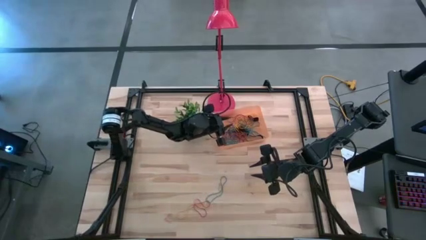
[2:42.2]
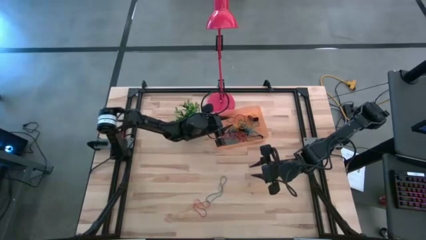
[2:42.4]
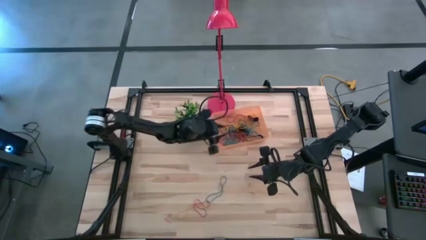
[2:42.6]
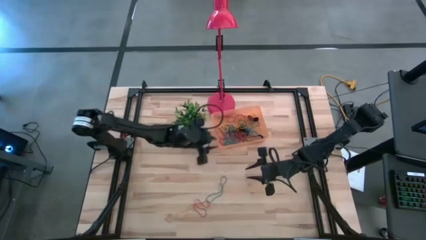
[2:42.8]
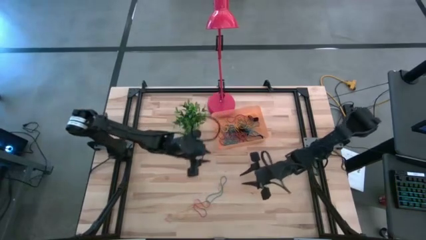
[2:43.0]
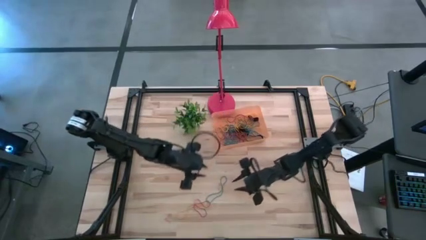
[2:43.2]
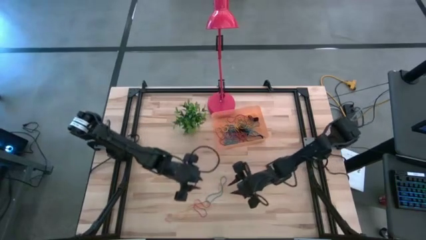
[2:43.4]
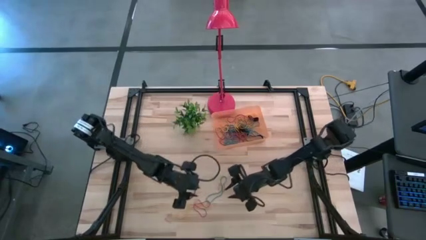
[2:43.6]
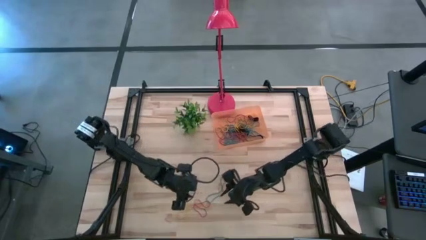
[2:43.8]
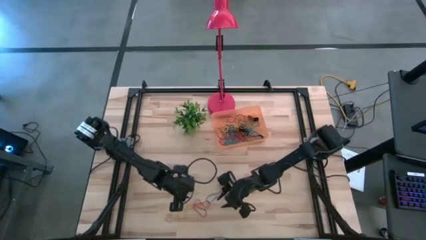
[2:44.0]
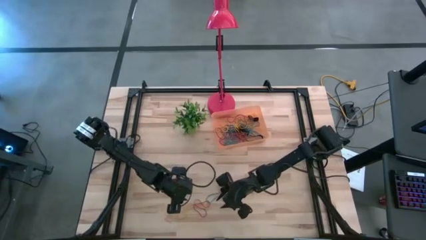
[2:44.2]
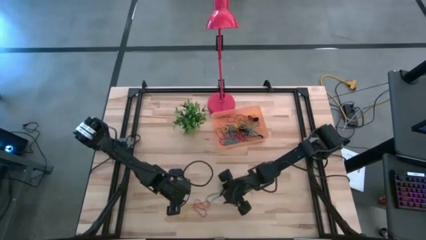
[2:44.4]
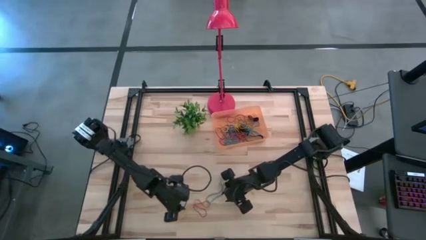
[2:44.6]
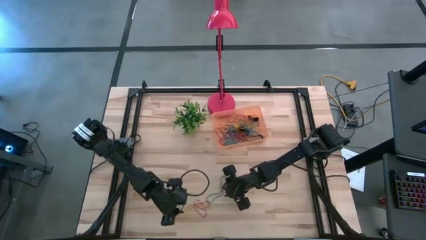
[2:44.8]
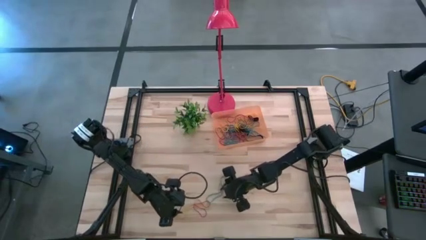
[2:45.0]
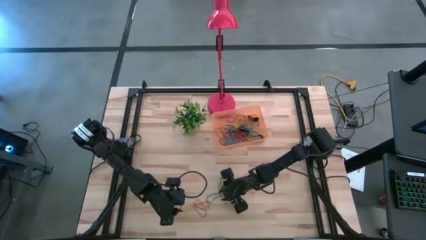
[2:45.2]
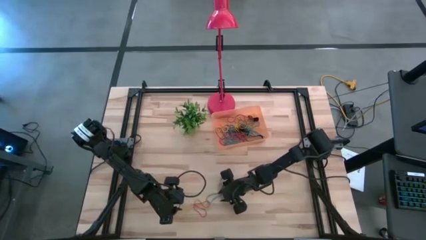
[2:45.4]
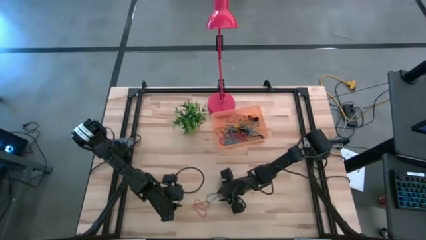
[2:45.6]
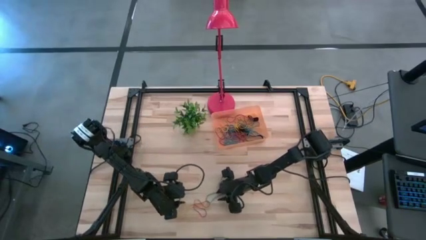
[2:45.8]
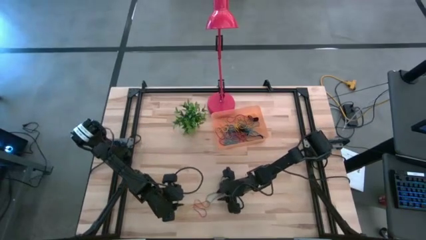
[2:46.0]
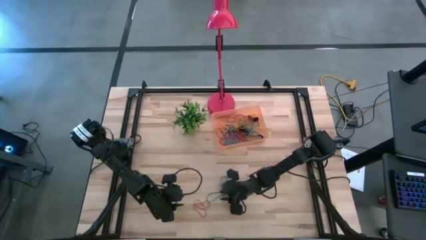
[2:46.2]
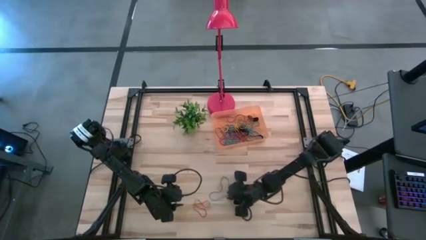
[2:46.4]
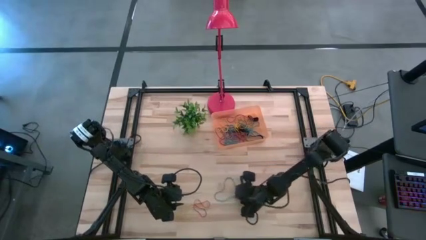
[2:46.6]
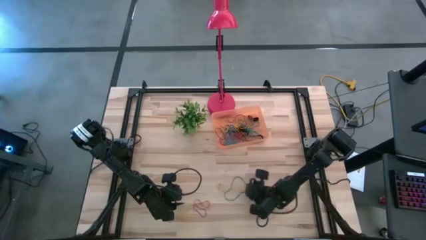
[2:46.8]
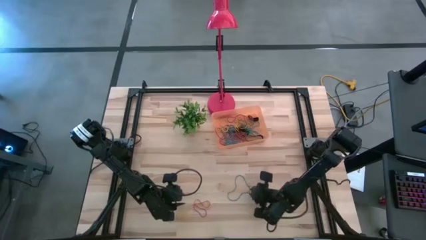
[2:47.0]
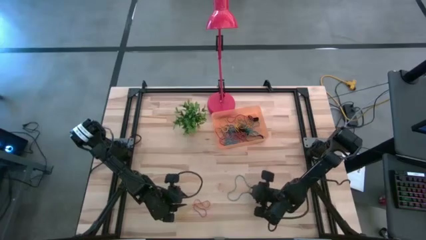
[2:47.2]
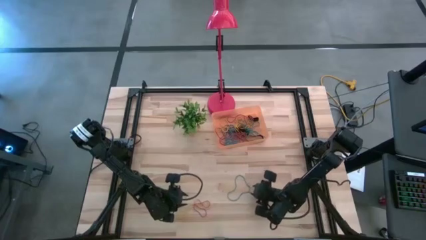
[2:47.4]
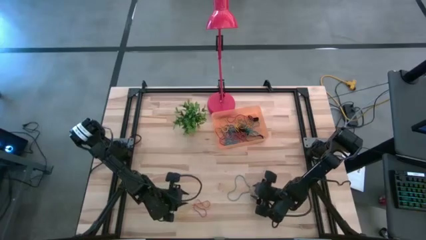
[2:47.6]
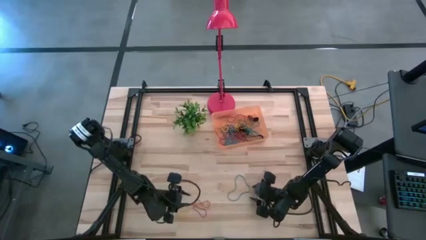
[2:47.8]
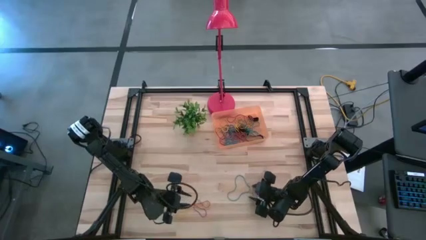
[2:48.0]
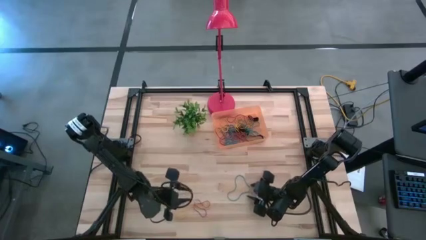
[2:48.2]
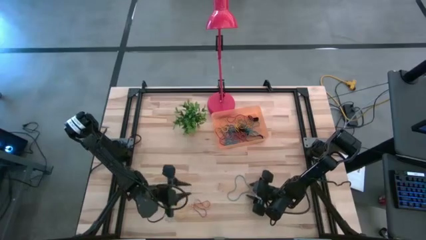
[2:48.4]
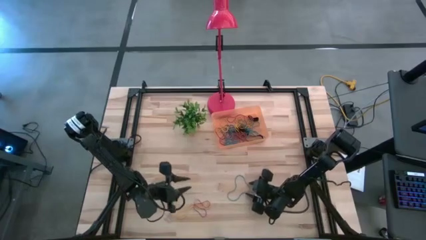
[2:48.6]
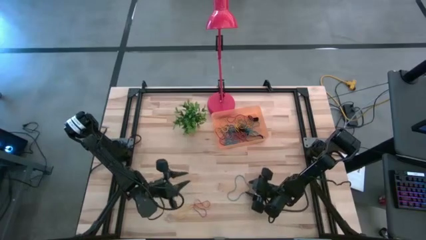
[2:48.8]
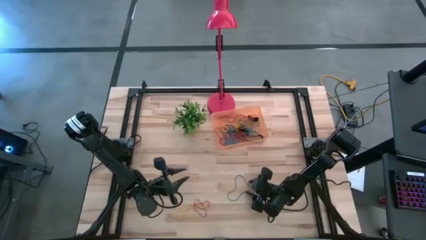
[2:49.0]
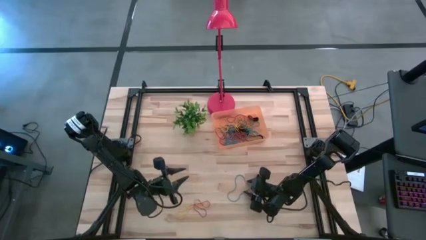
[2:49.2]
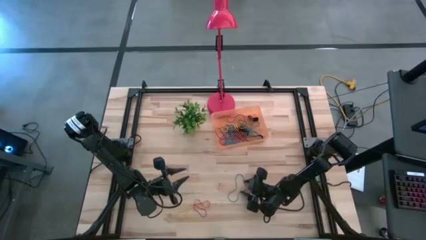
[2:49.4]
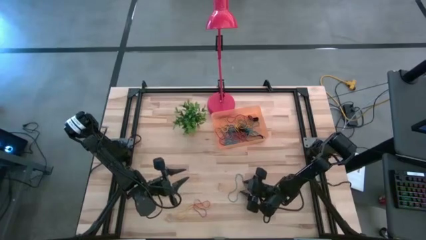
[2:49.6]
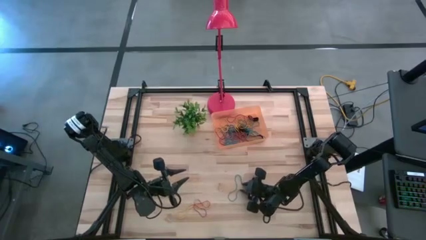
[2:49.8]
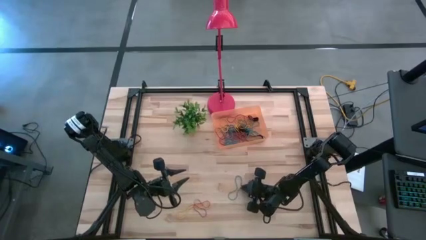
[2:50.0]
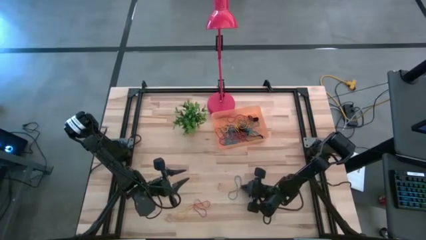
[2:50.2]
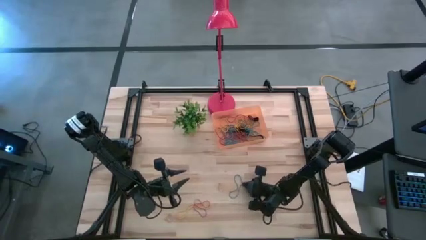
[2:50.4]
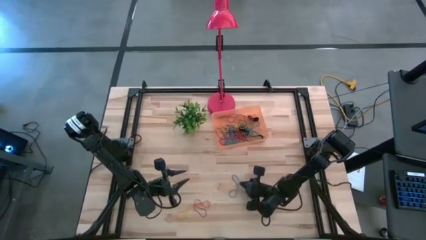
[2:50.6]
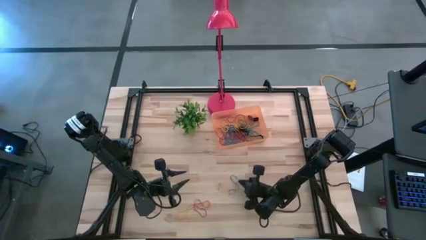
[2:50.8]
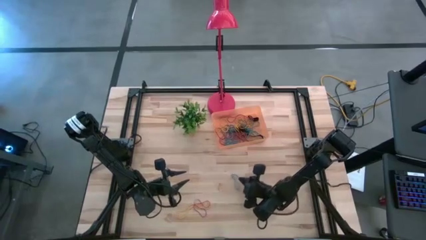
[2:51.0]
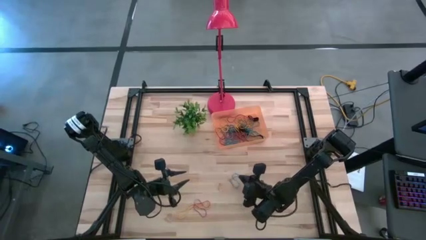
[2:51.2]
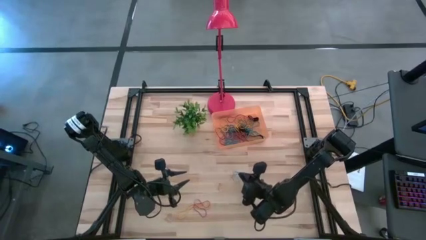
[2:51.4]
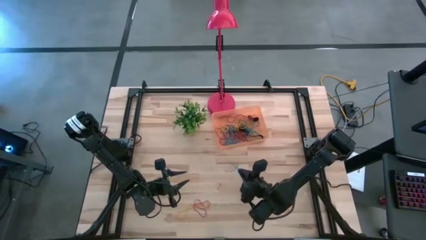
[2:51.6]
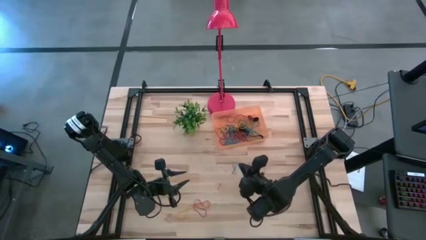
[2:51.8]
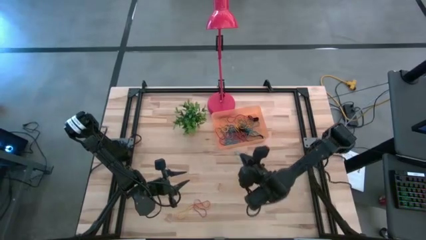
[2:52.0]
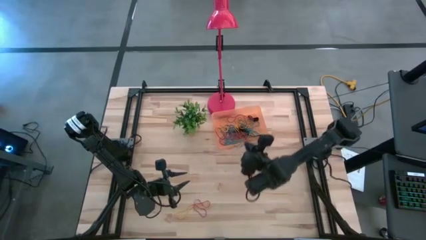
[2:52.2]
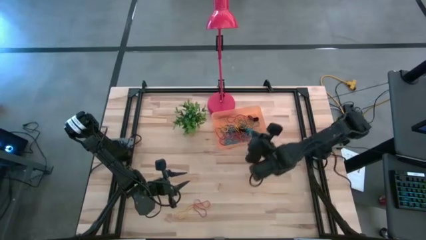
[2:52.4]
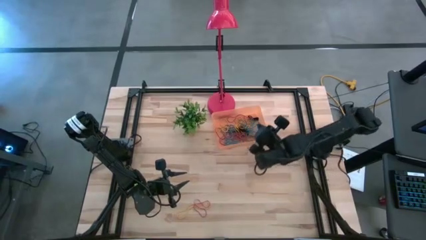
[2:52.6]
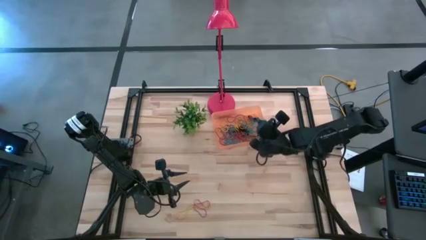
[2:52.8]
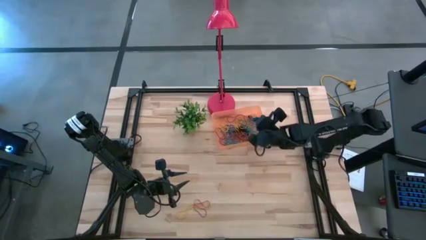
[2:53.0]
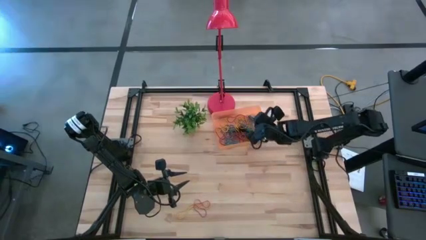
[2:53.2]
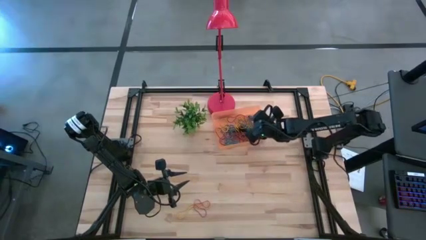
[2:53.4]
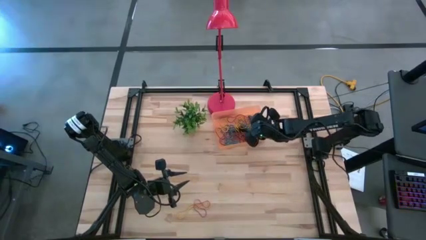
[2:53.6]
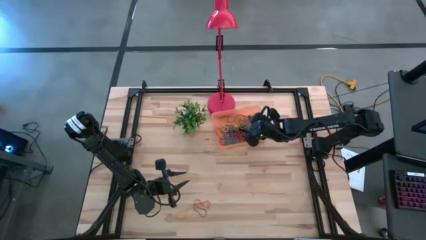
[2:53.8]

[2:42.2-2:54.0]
Task: Pick and place rubber bands into bin
Put the blue rubberband into the orange container

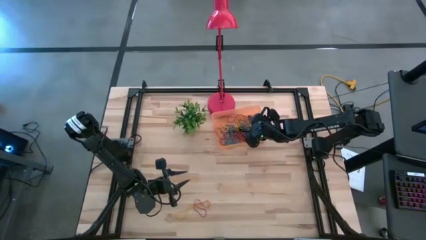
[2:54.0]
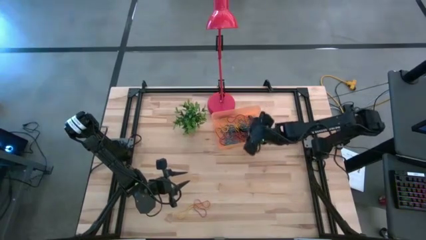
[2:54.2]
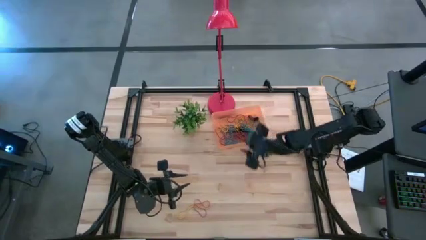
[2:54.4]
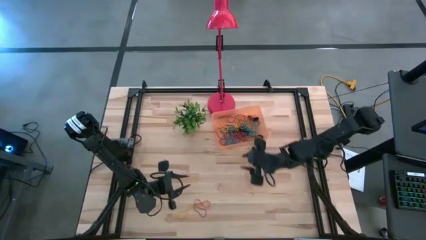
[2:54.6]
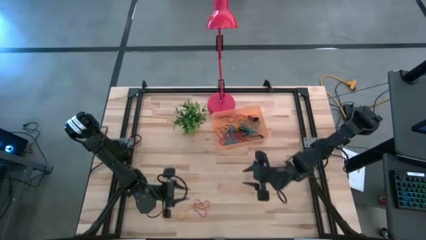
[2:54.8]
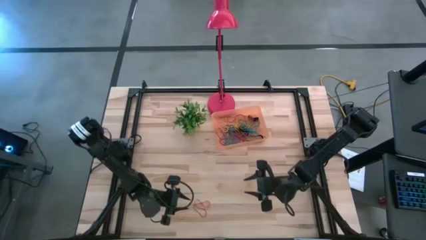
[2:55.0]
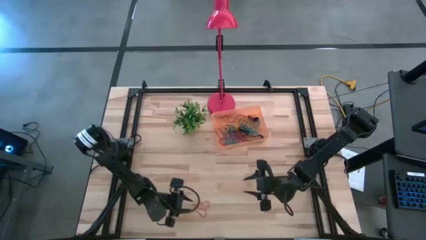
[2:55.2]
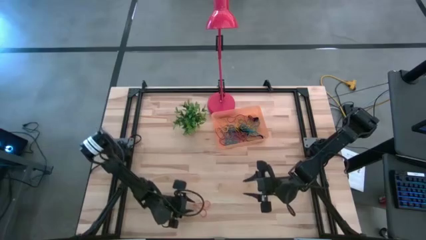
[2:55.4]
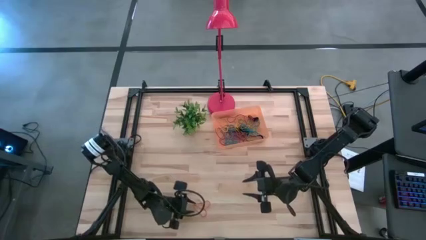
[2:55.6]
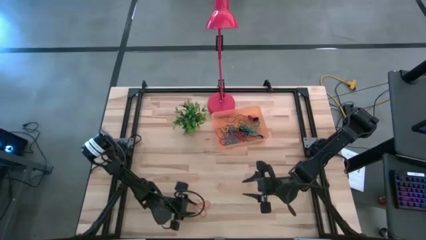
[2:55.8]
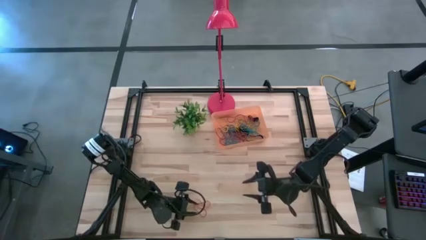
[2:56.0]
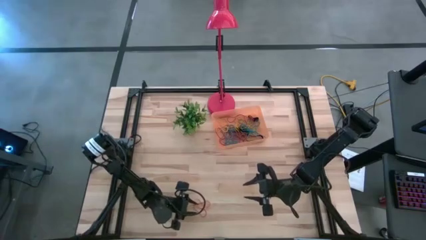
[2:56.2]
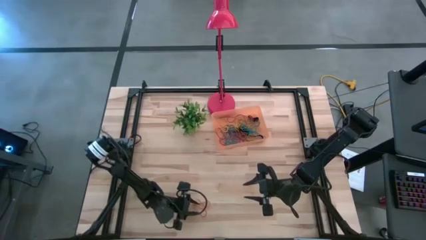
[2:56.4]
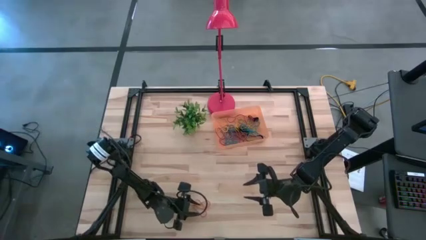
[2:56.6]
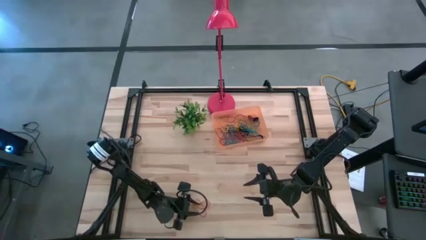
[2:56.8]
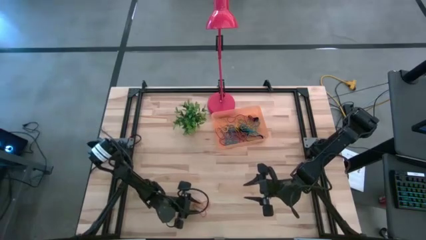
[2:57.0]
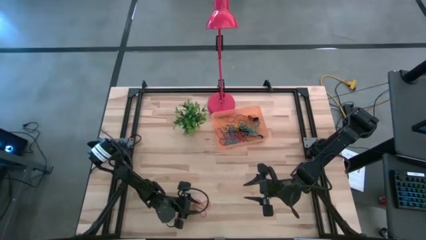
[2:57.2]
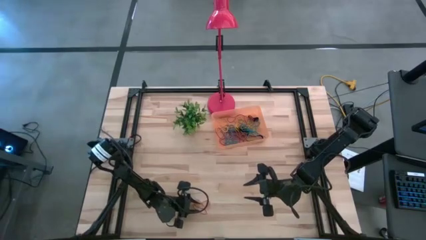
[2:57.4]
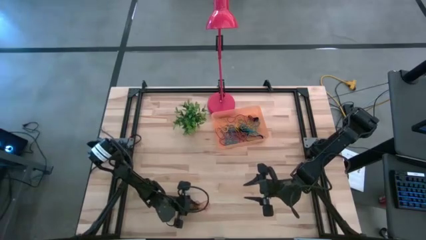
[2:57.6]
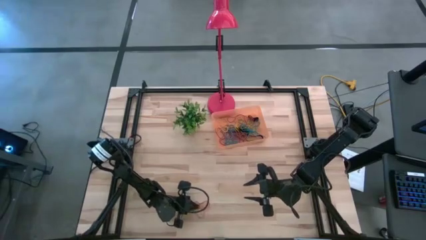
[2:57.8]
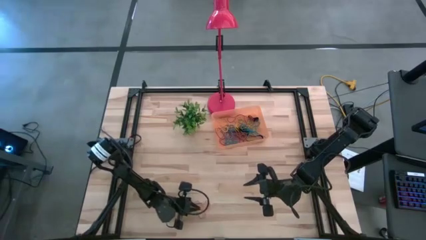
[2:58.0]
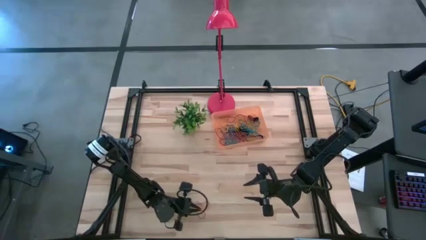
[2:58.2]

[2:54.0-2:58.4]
Put the red rubberband into the orange container
